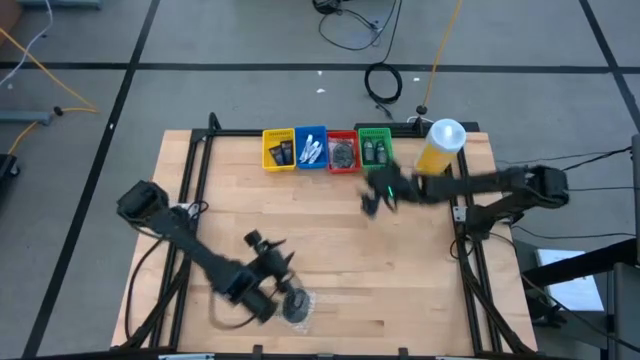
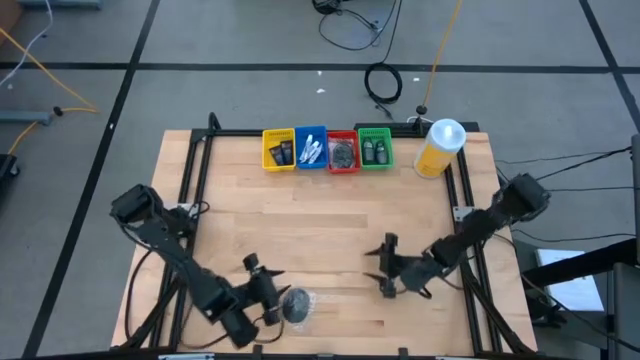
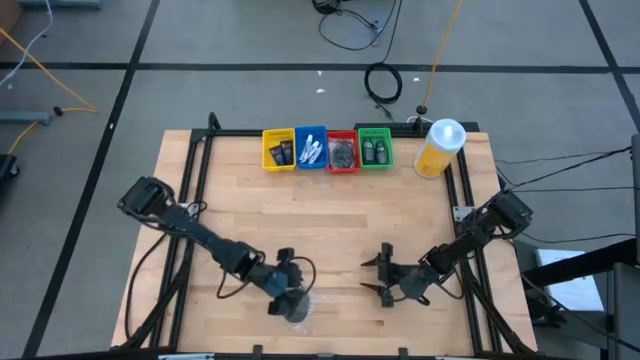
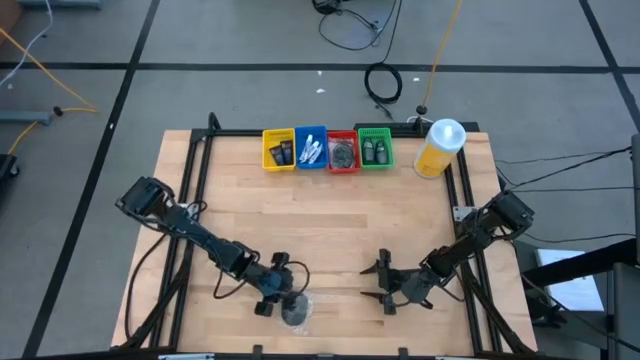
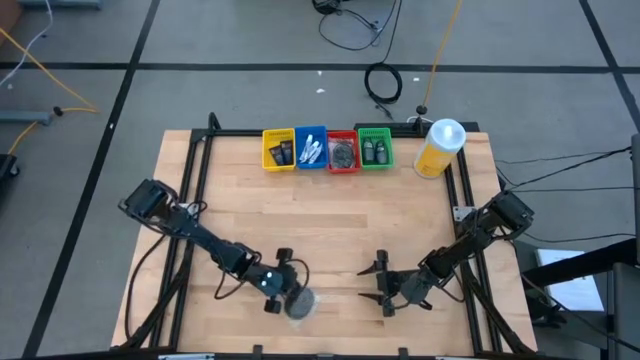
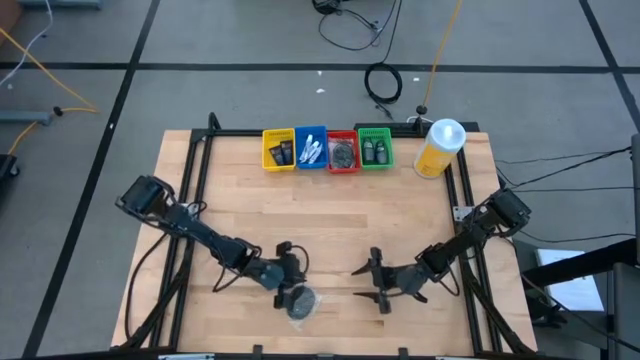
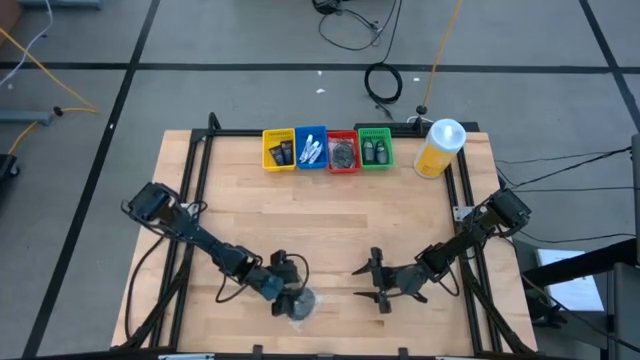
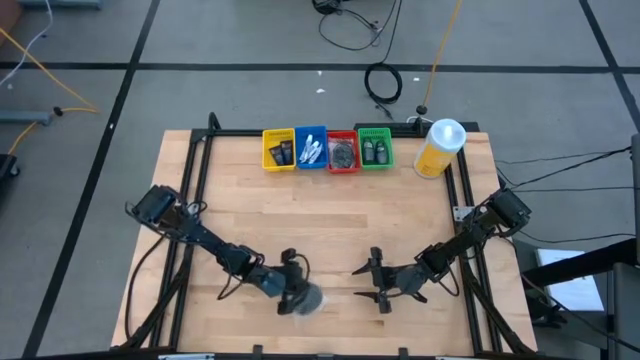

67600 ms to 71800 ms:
Task: Pick & Place Travel size toiletries
Put the black hairbrush into the red basket

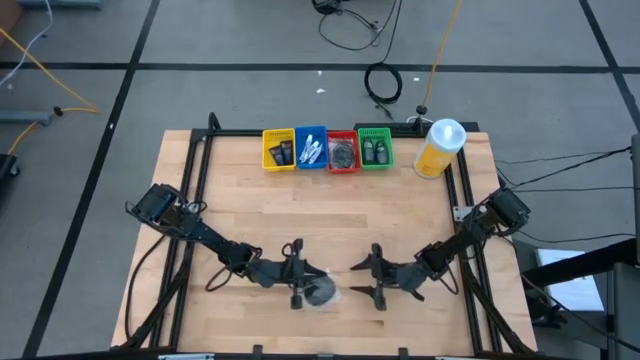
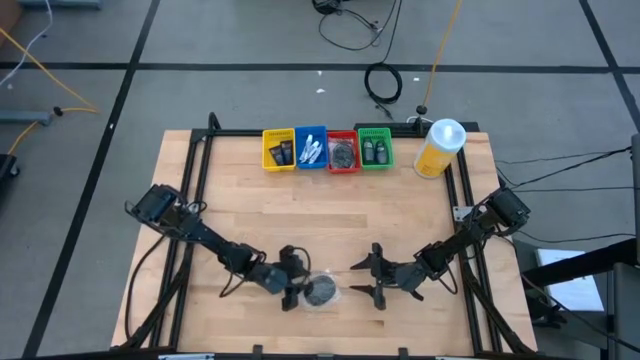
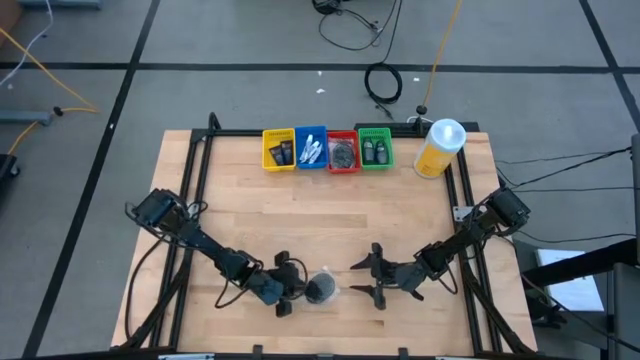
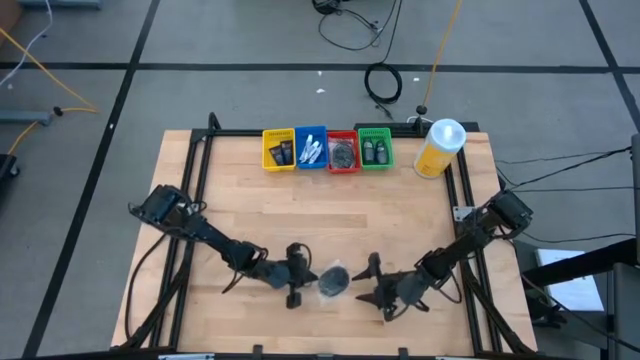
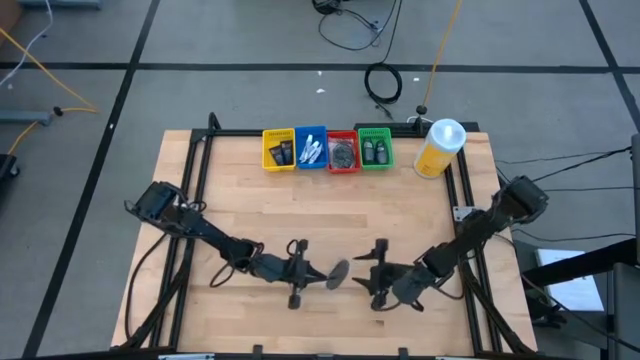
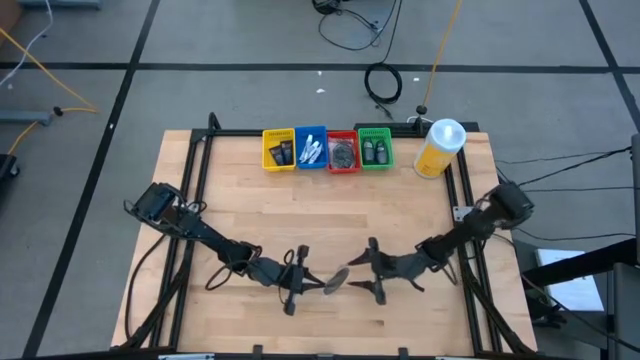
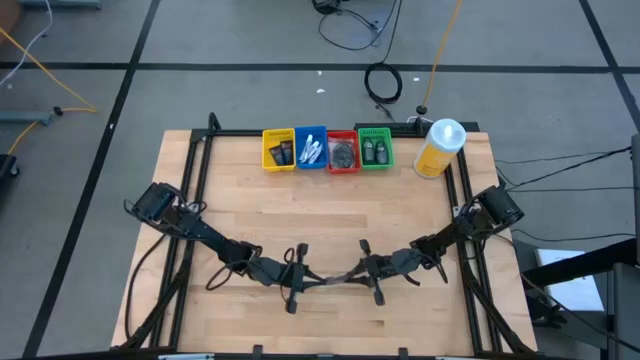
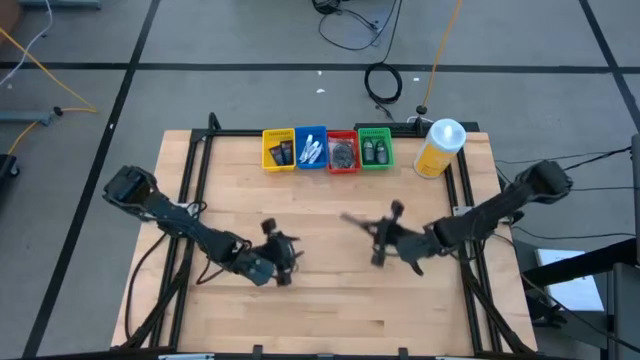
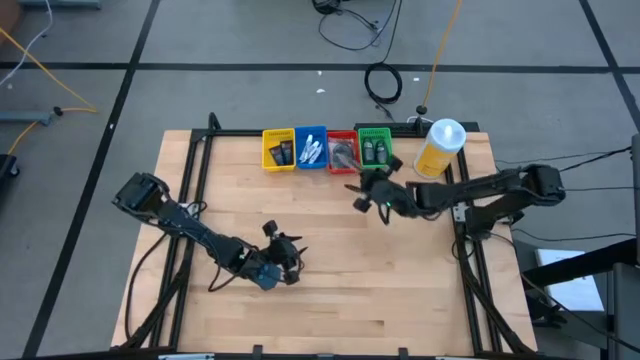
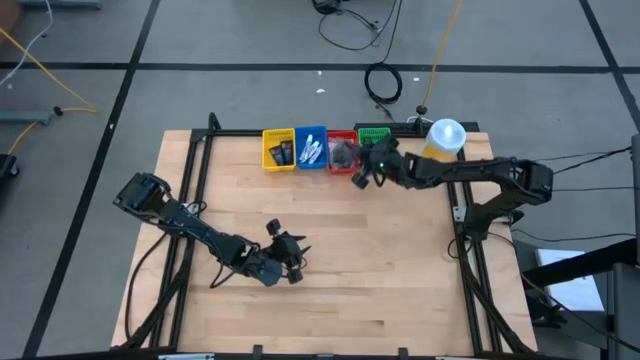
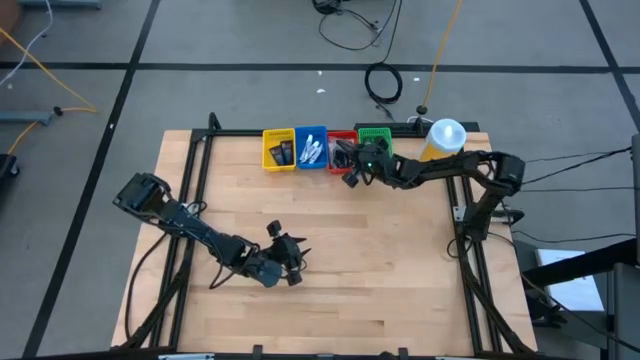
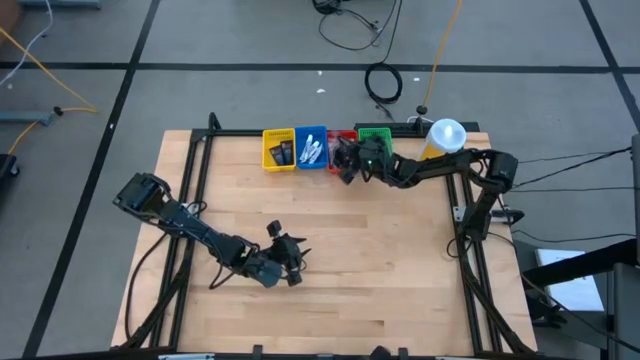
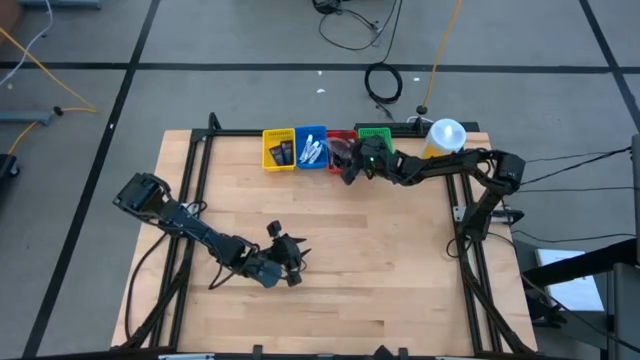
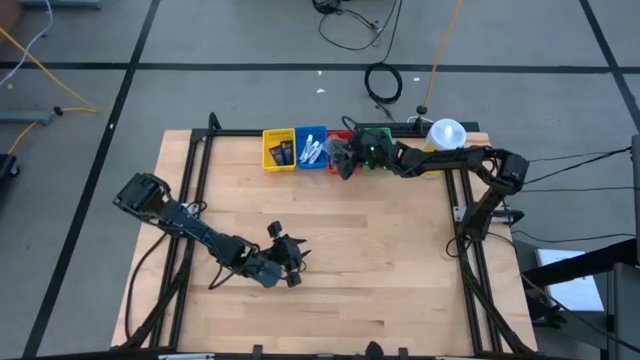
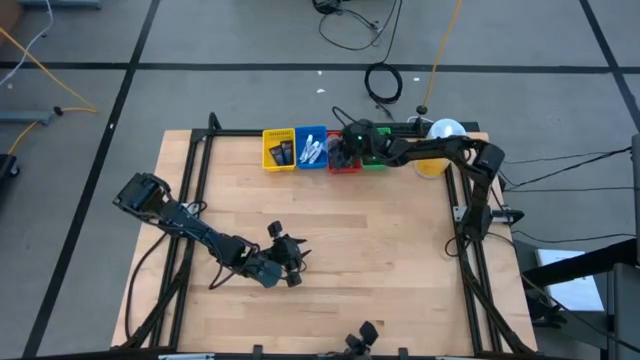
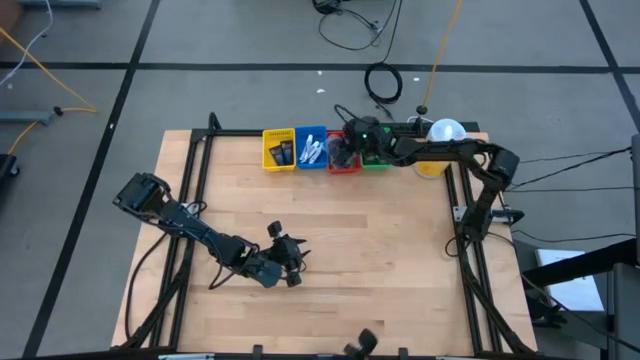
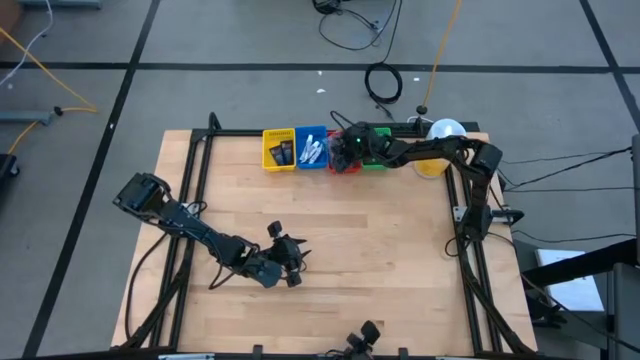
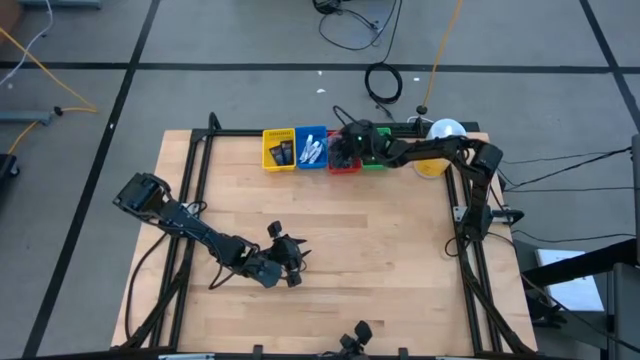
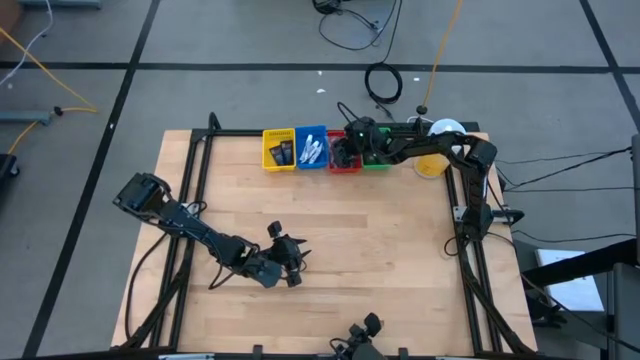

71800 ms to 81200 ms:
Put the black hairbrush into the red basket

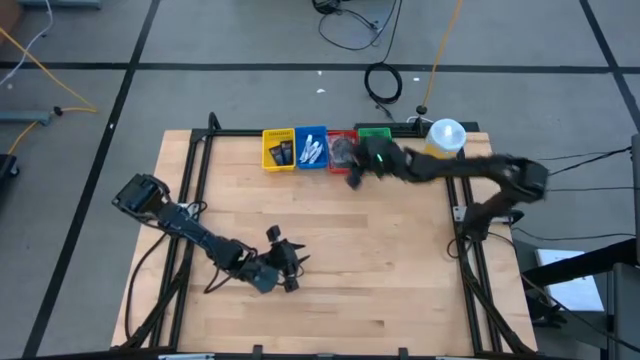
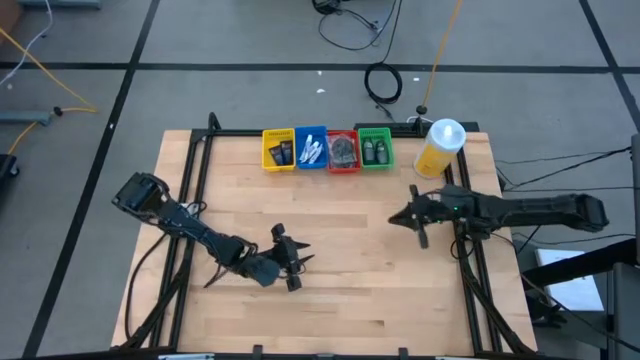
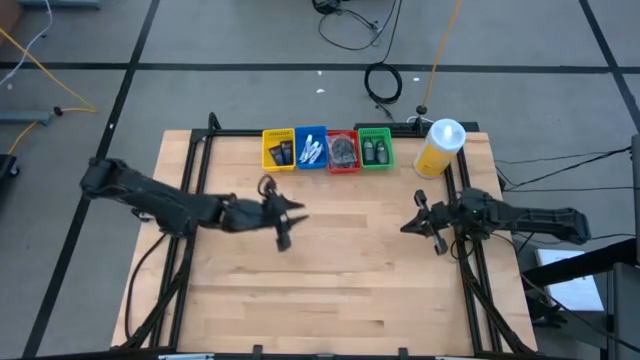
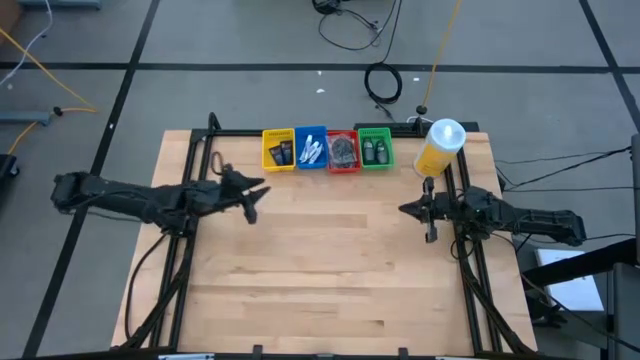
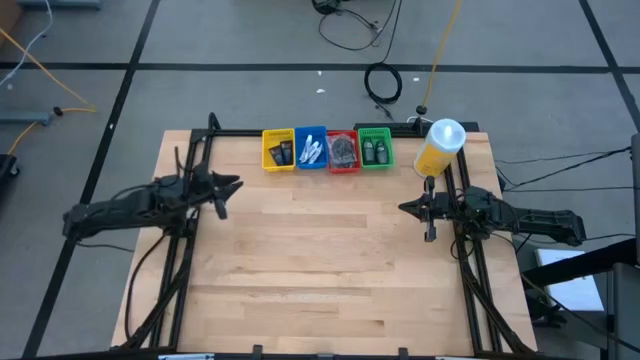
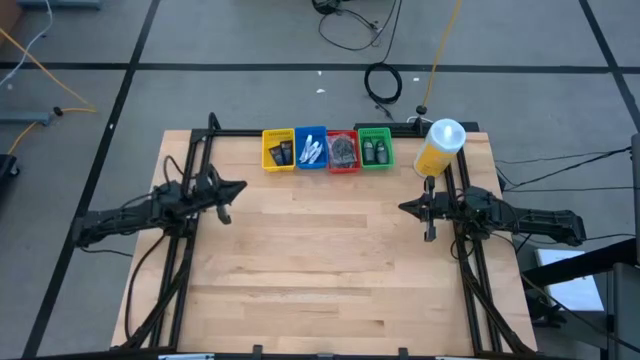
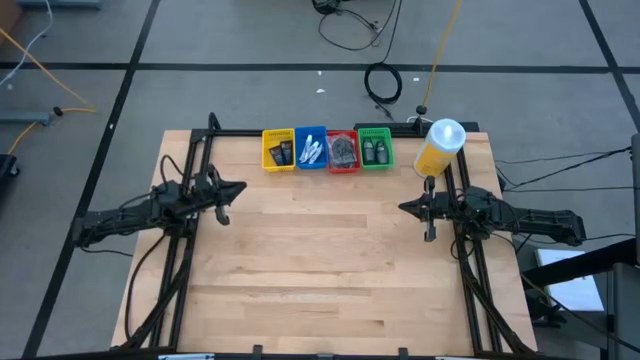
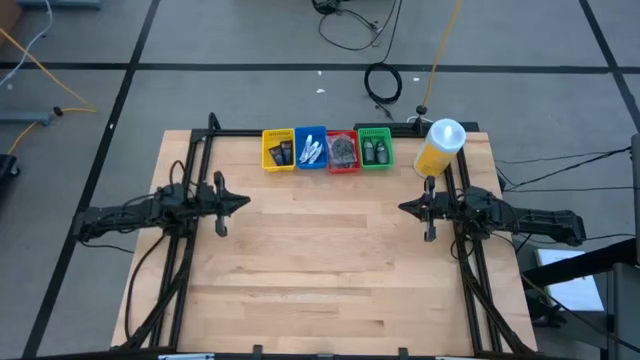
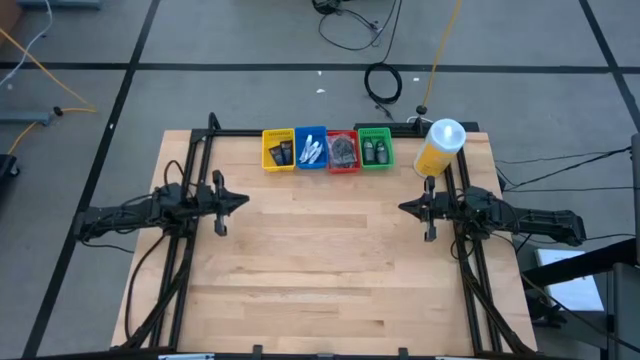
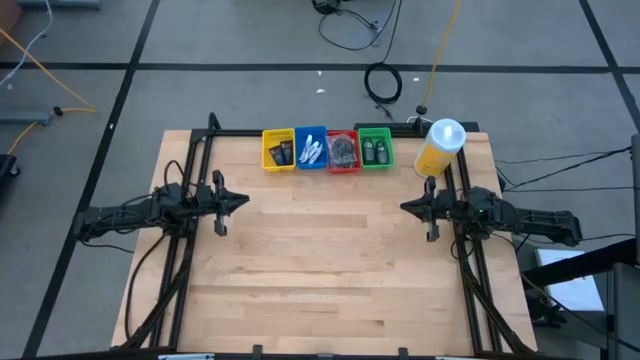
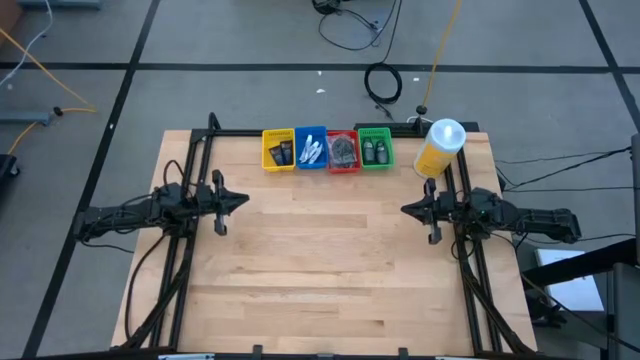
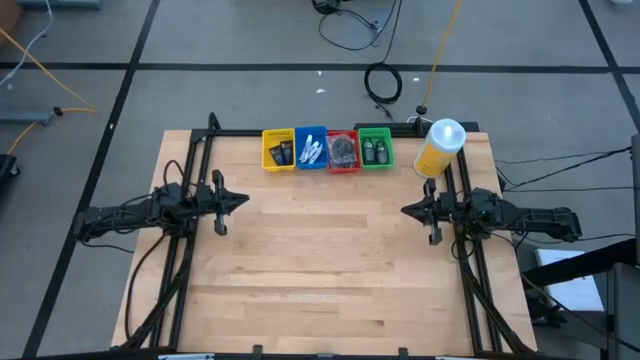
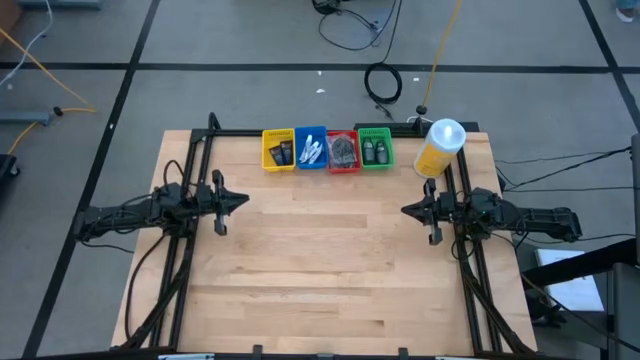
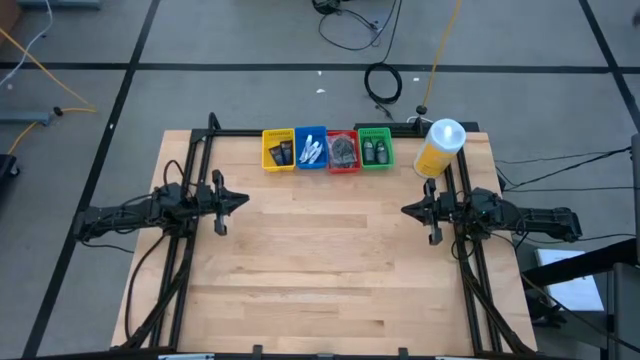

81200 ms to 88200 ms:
Return to Home Position
